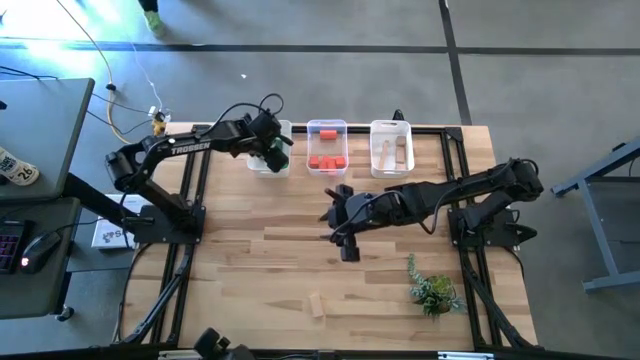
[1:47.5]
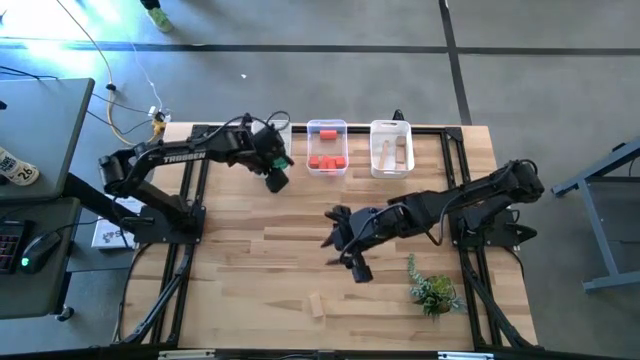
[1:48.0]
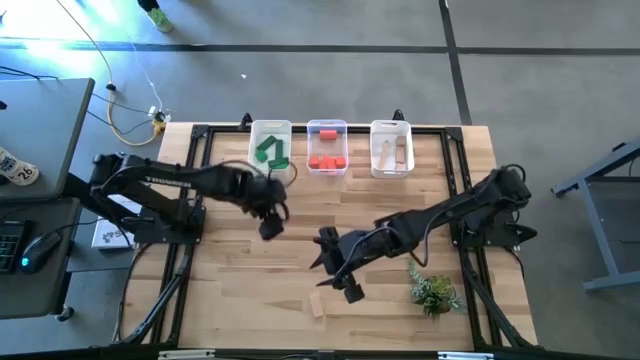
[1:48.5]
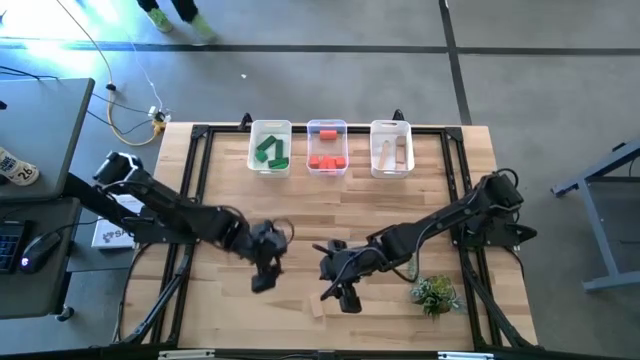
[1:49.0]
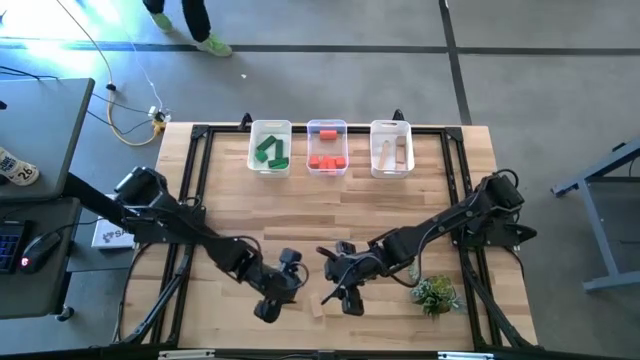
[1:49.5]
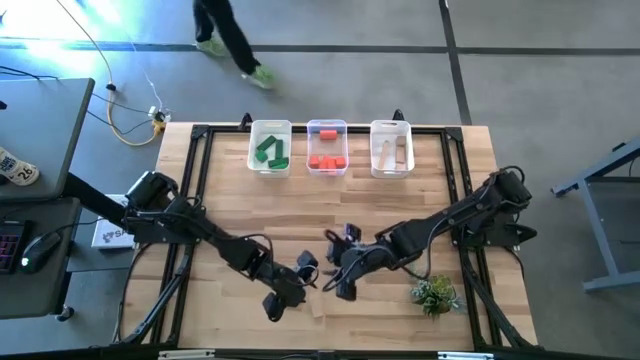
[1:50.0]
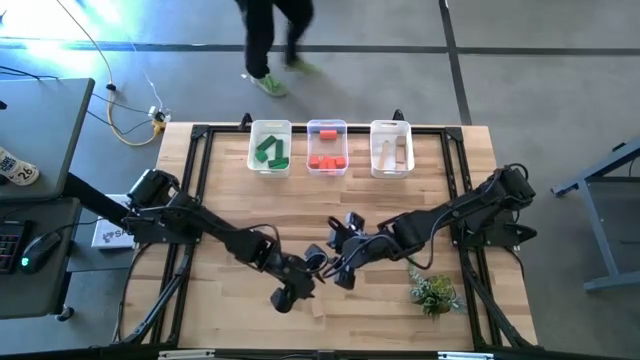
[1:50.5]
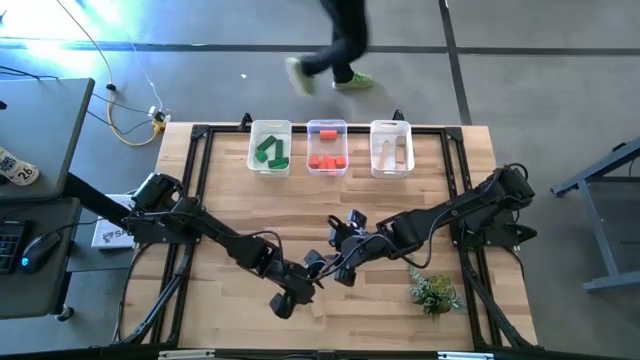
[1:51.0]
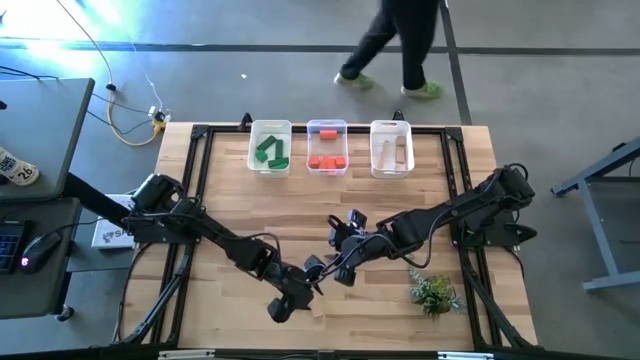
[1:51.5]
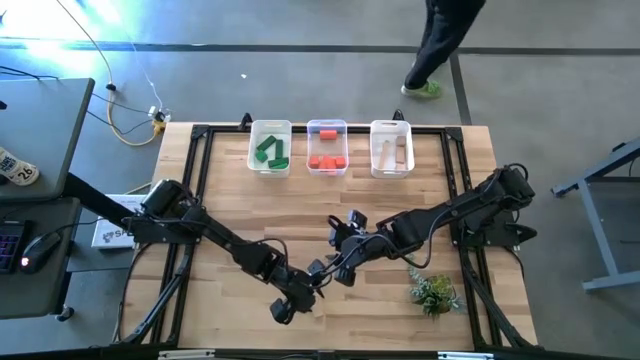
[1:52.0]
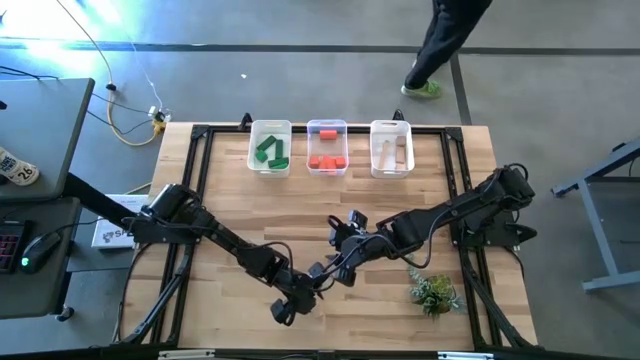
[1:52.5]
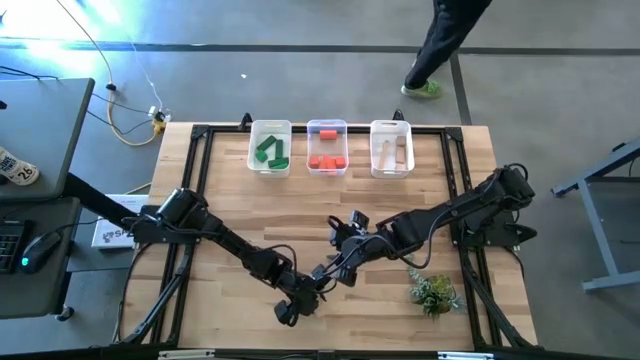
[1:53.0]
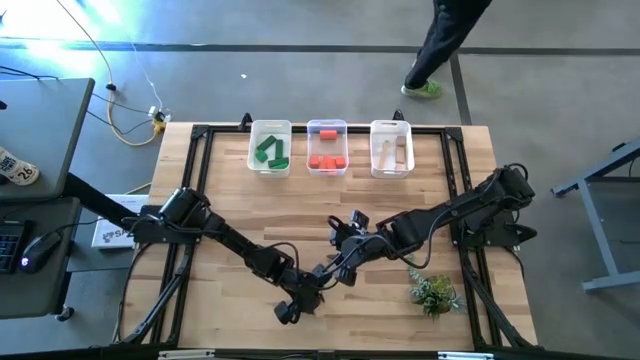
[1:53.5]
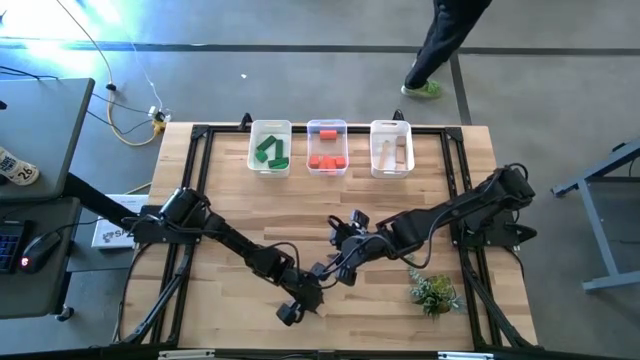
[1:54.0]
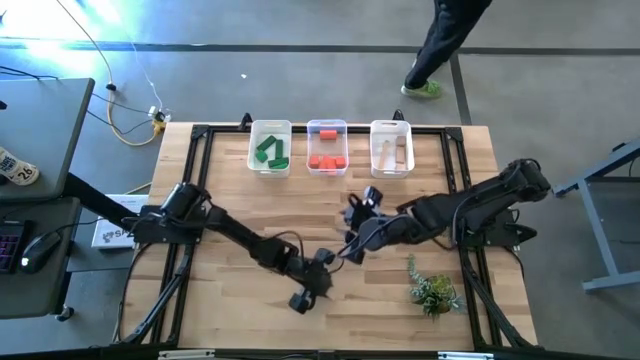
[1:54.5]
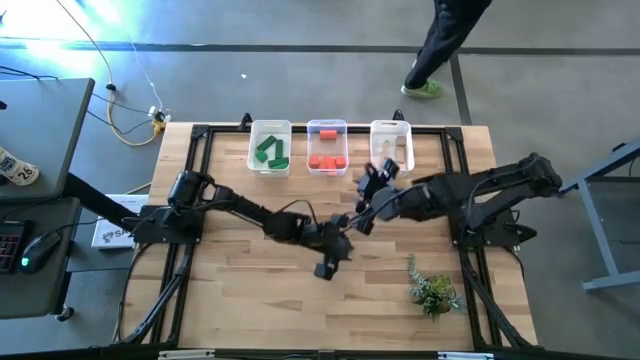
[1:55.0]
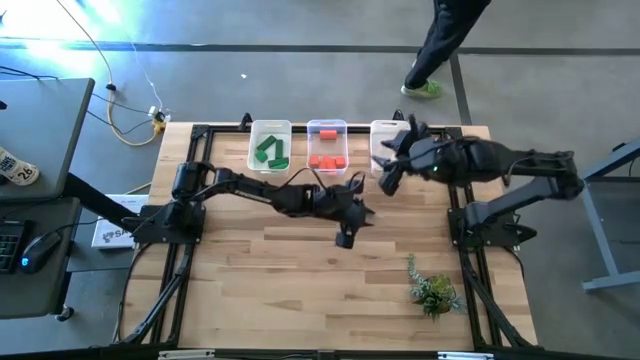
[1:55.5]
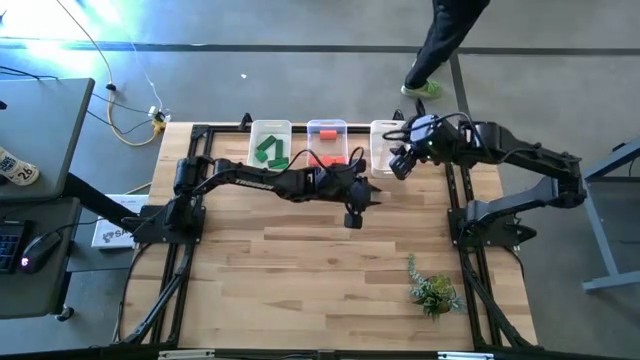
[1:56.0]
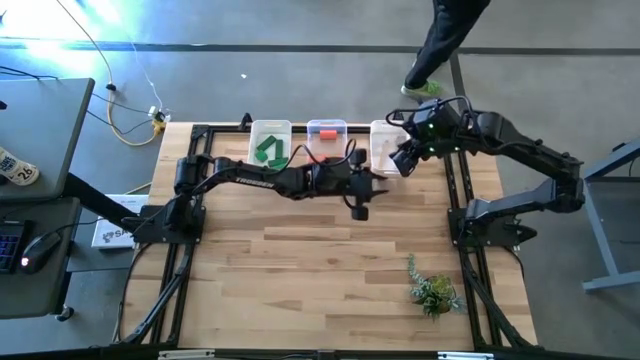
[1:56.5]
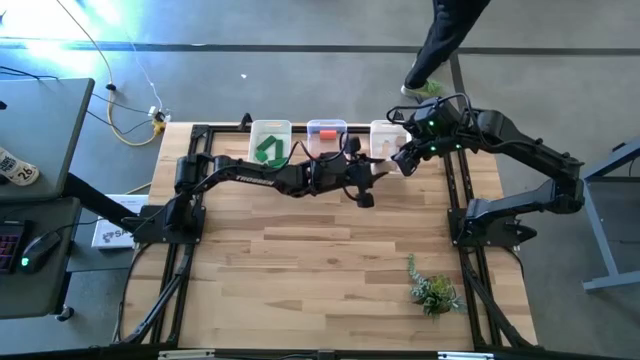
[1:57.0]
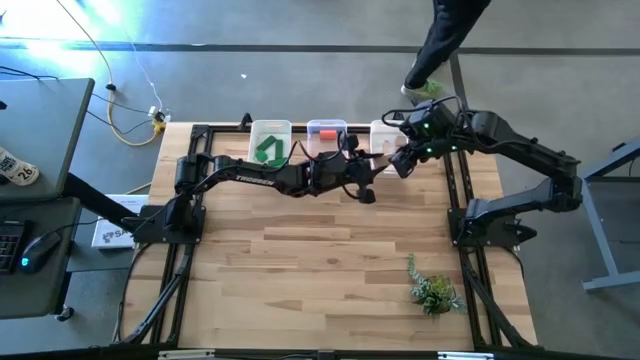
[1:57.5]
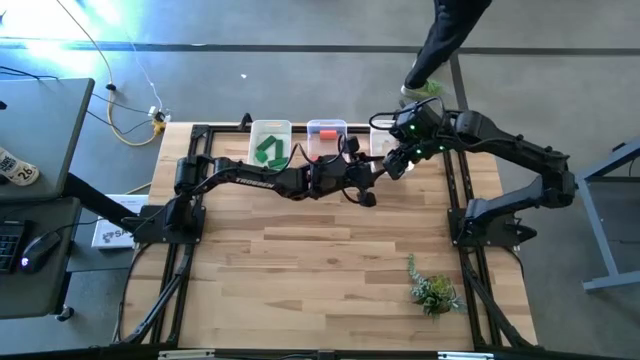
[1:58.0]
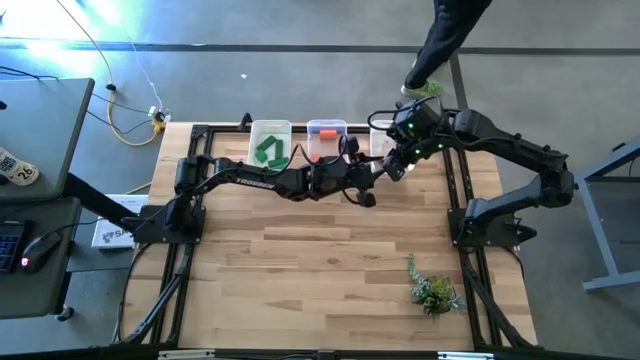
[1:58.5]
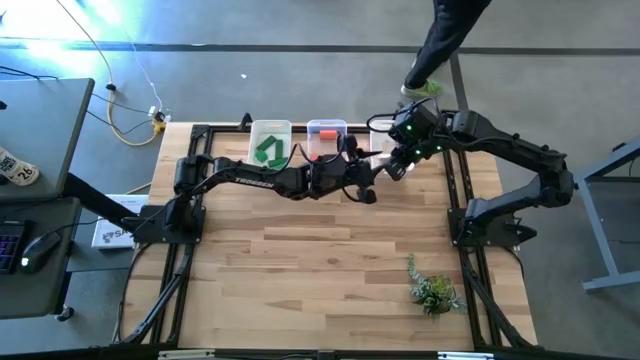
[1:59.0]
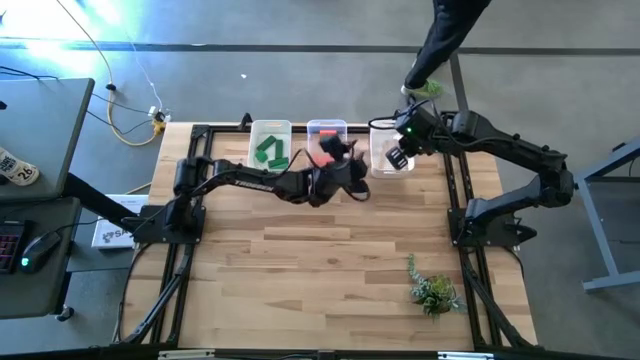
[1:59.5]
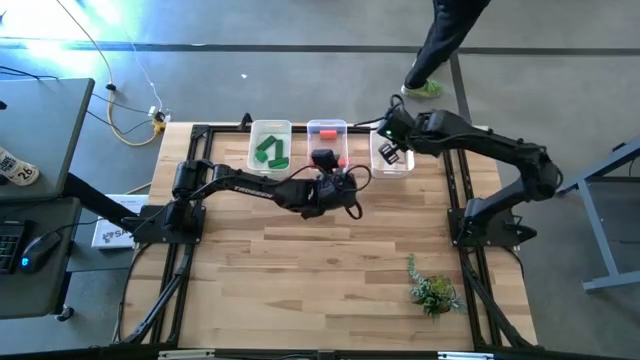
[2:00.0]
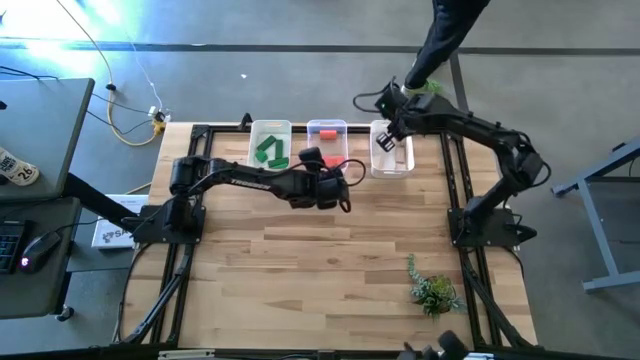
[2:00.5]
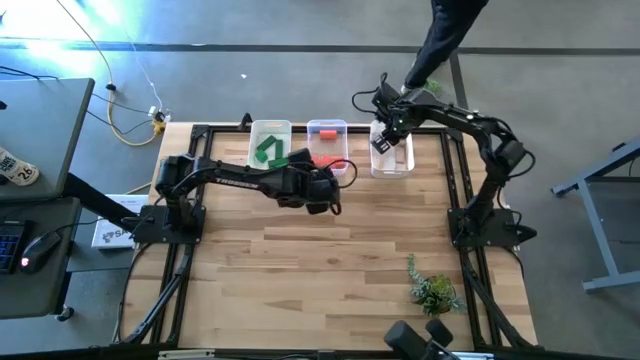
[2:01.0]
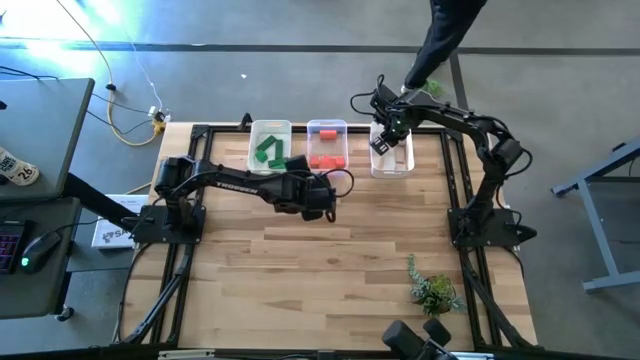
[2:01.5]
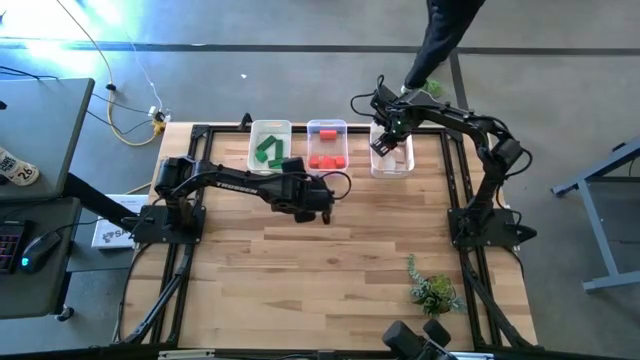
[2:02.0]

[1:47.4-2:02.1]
Task: Sort & place blocks by color
Put the brown block into the right white bin

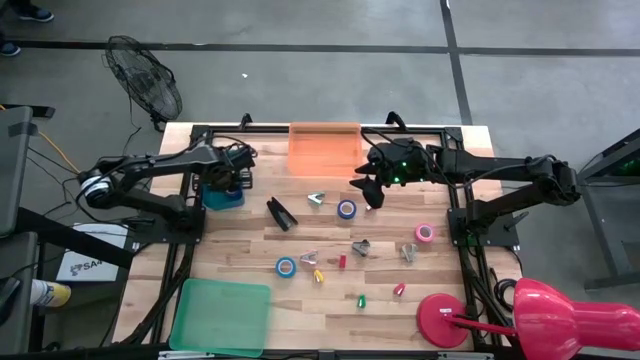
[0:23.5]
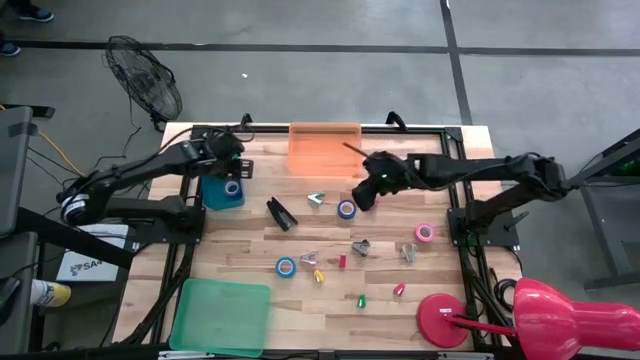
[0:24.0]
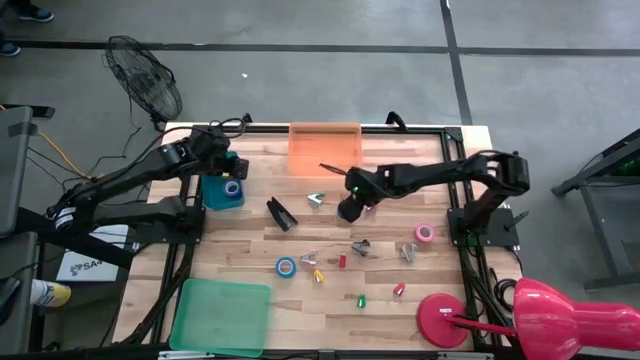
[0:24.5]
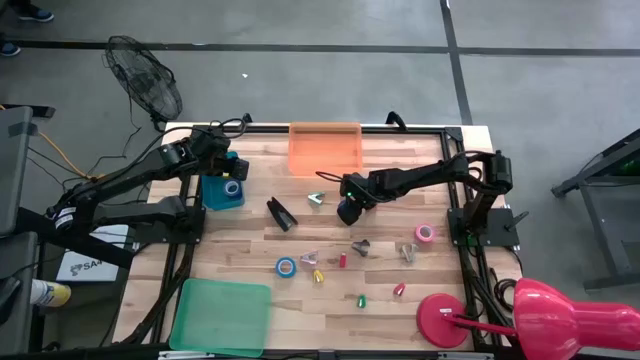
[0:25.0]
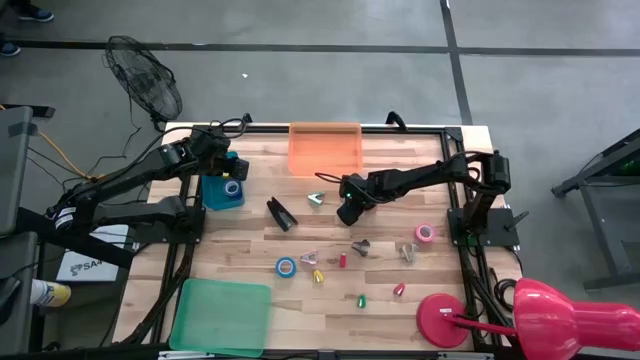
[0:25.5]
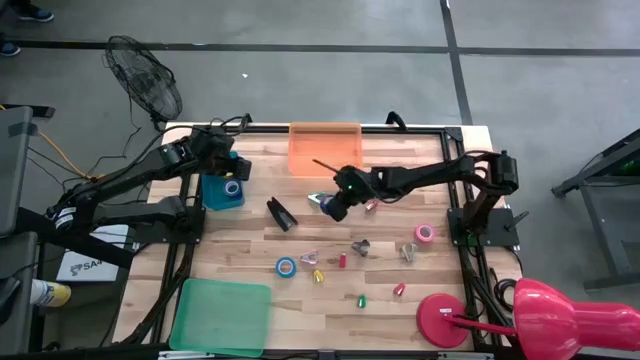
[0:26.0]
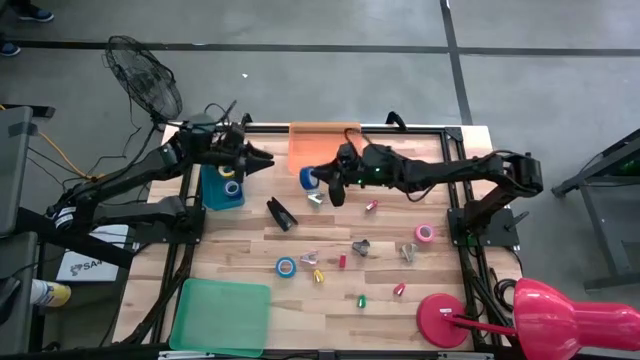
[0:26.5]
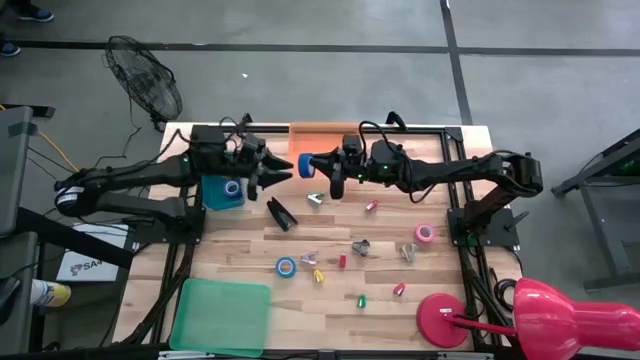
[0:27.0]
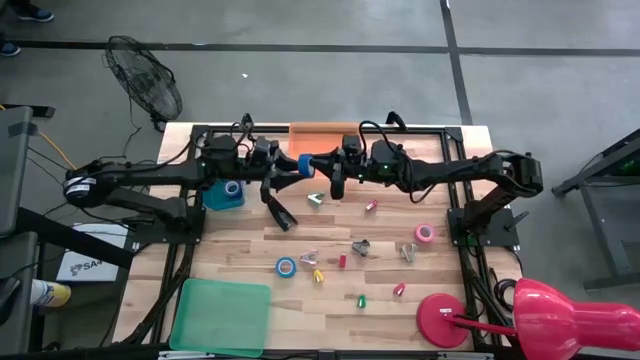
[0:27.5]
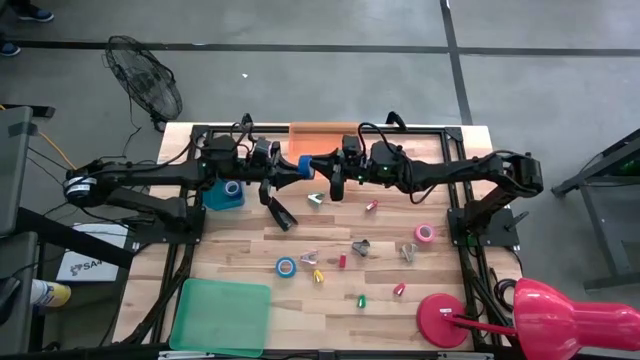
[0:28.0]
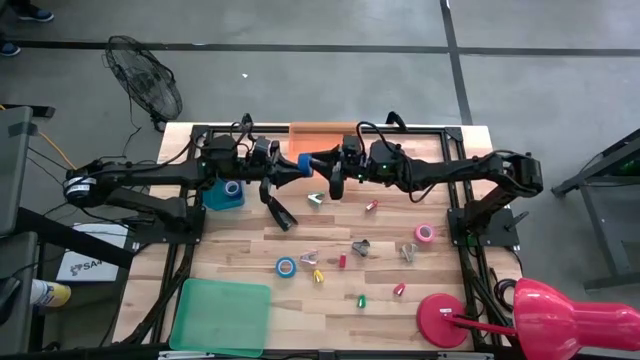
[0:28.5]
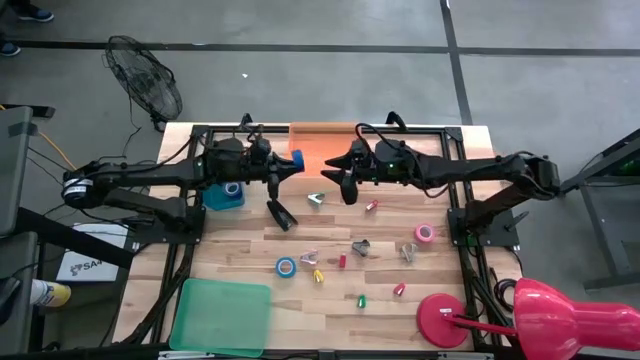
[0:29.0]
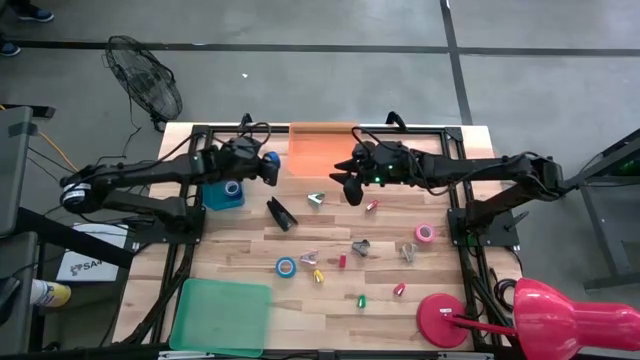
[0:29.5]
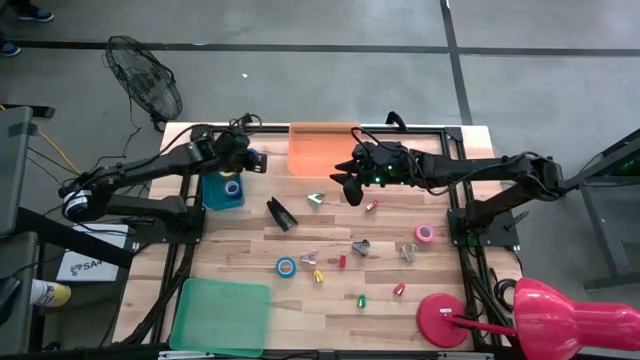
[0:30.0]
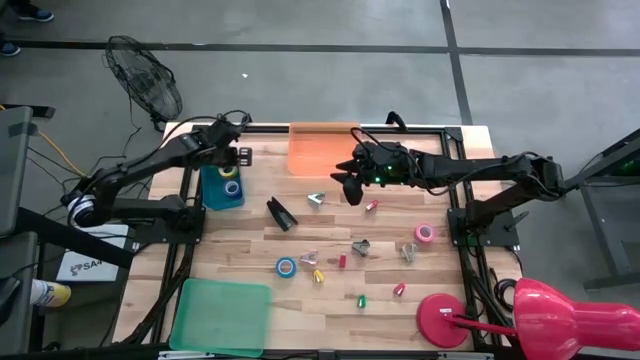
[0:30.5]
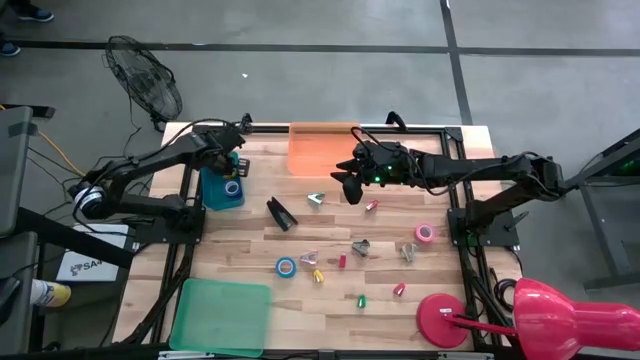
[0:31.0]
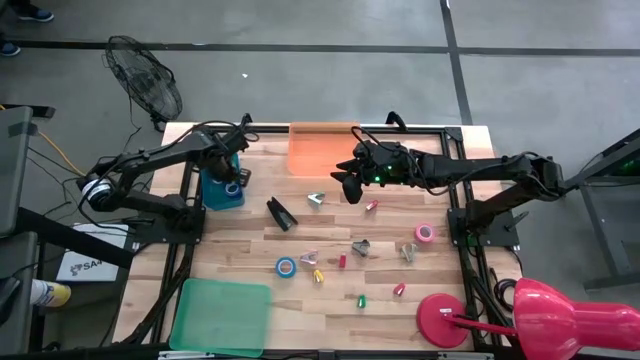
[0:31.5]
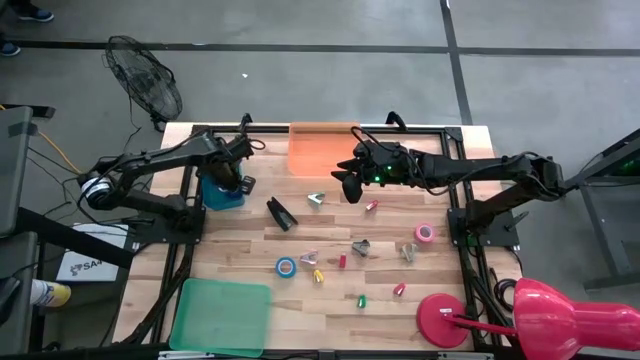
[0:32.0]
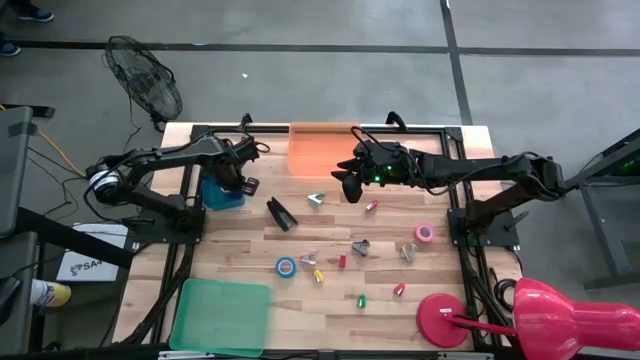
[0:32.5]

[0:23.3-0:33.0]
Task: Pick and place Stapler, Stapler remover, tape
Put the blue tape into the blue bin
